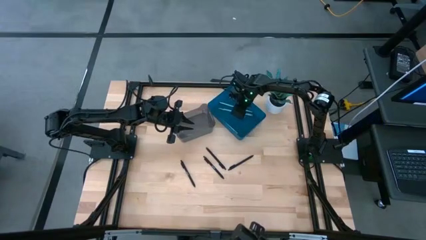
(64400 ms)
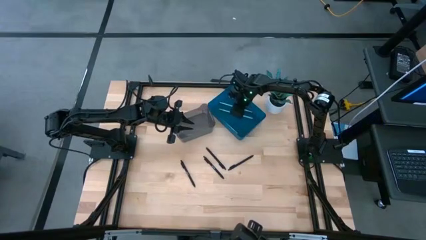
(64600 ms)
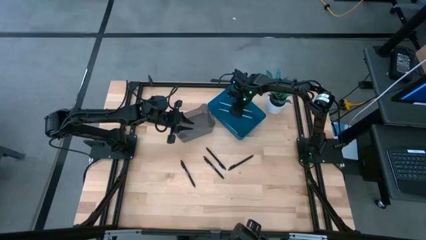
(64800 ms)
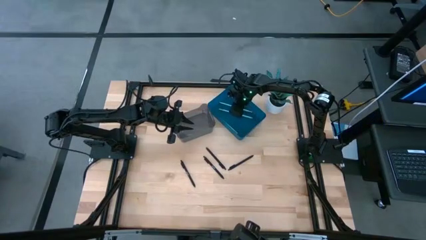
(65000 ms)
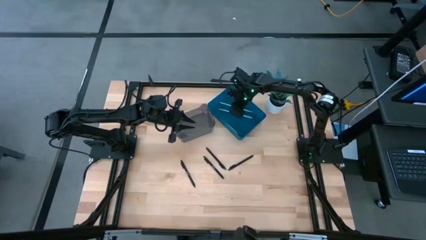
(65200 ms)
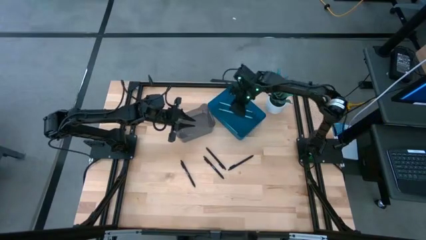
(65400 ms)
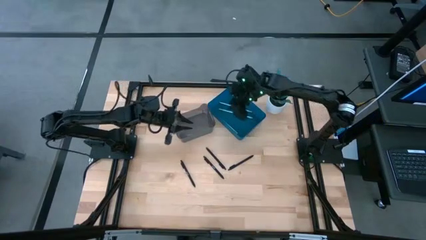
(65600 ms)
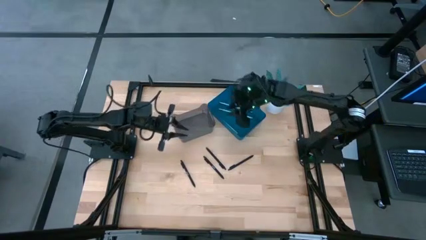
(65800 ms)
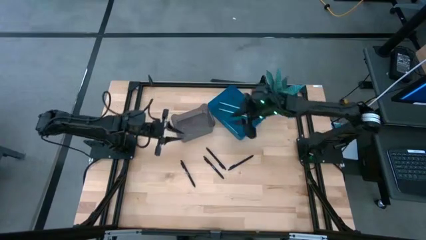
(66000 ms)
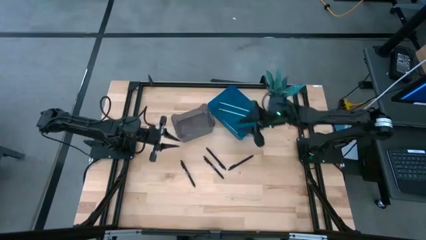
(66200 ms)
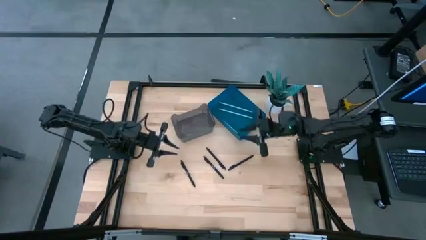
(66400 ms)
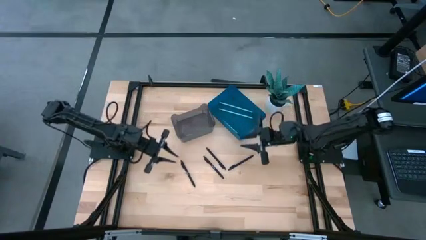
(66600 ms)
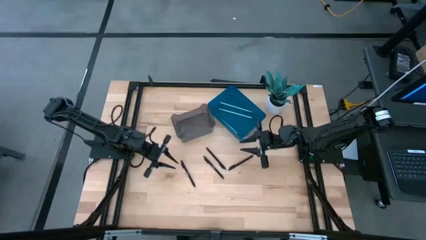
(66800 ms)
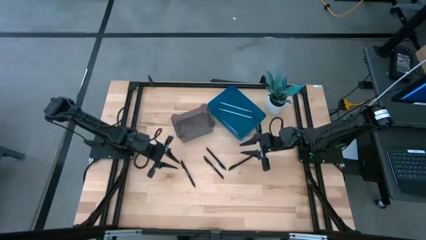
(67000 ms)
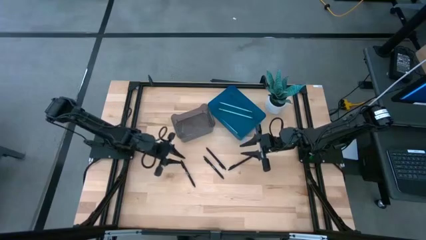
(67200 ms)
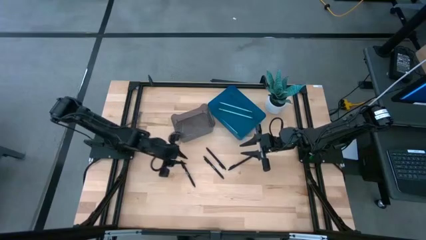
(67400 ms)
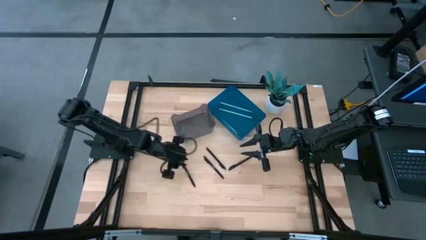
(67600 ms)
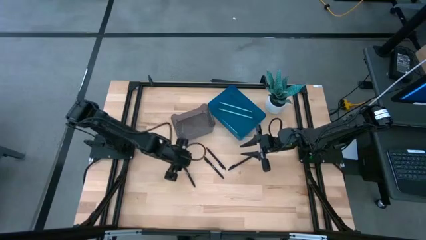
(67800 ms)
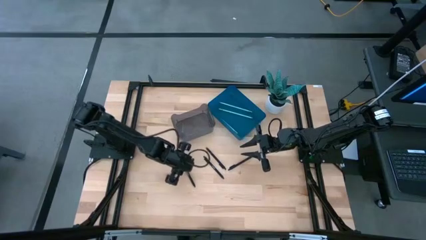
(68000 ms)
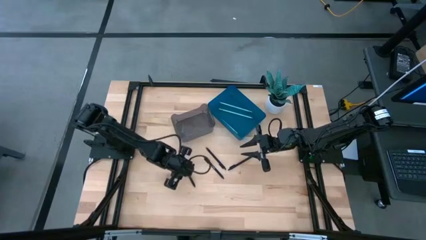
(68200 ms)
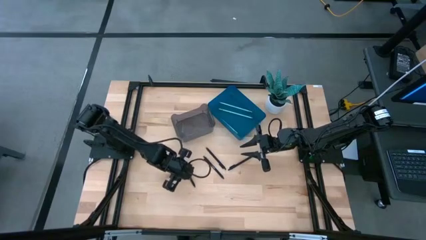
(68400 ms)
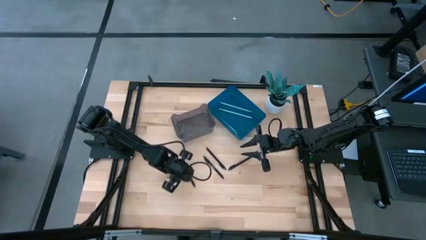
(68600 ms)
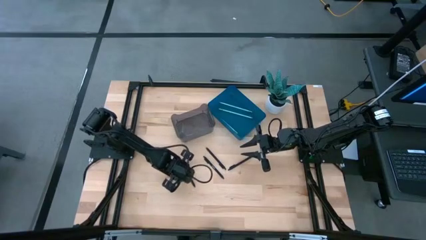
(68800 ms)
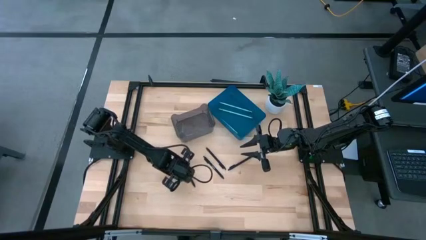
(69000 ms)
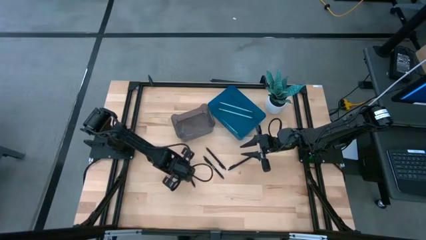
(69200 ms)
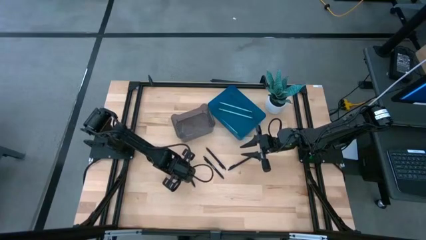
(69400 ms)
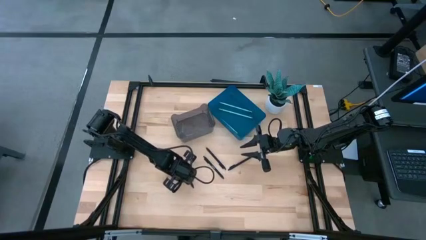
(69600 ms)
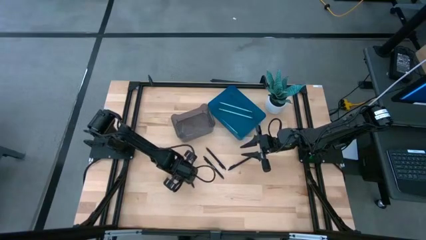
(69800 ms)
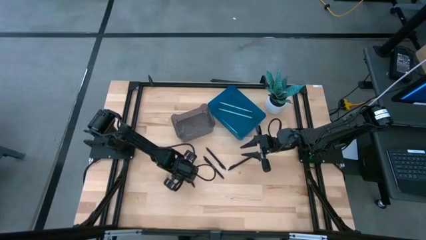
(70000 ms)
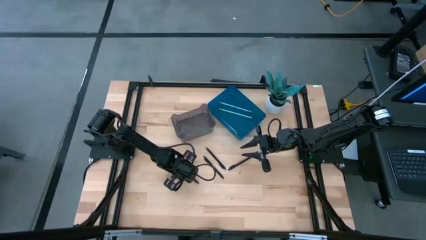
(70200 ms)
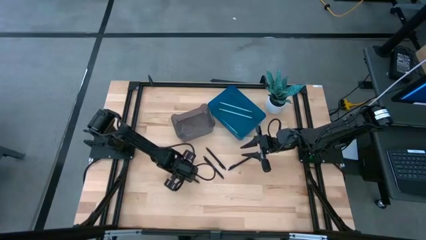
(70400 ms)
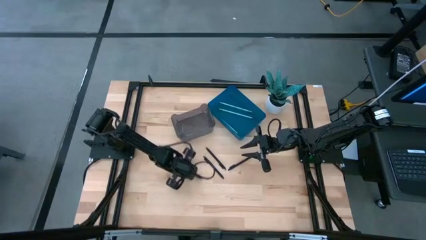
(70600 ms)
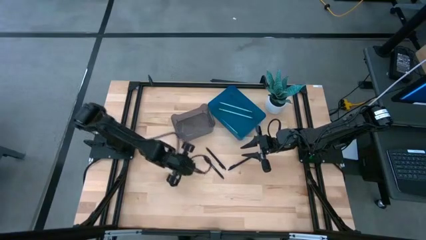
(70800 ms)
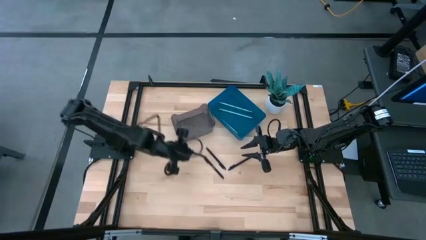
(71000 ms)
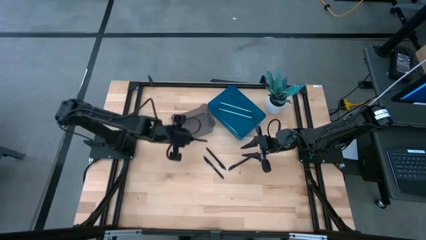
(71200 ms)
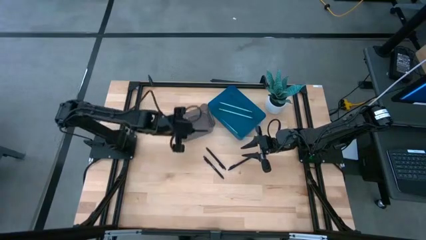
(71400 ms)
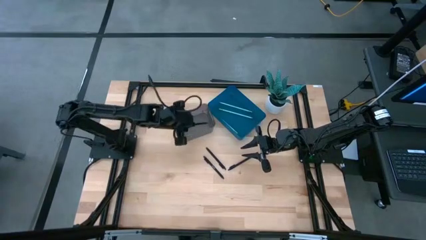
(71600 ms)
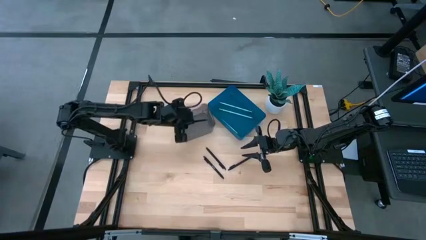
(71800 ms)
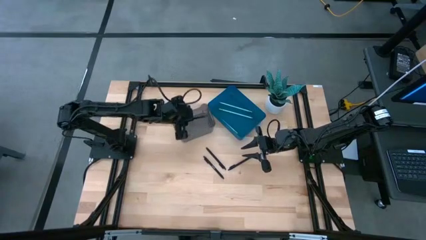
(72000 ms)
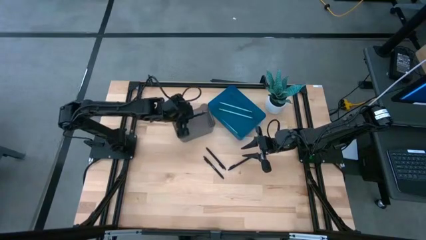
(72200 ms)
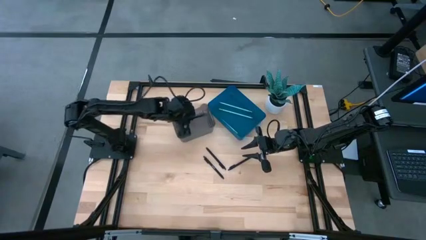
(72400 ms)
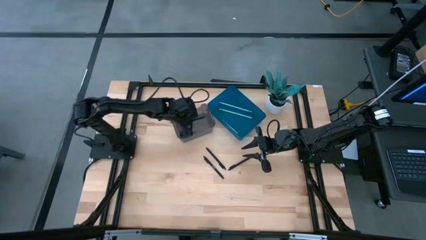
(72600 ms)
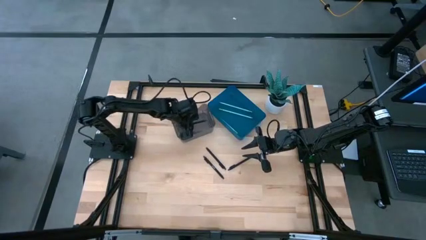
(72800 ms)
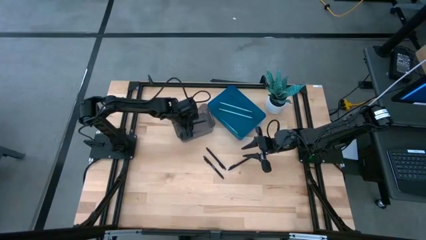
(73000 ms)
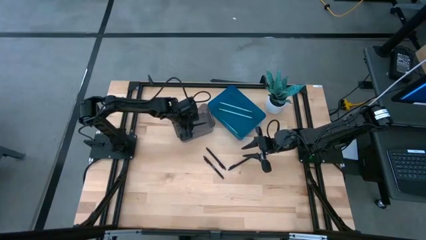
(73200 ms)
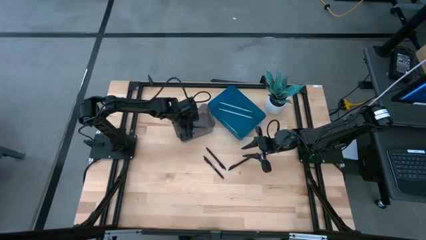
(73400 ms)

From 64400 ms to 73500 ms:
Task: Sort pens & pencils
Put the black pen into the black bin

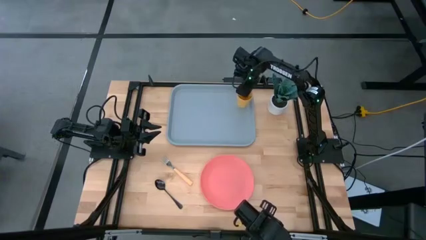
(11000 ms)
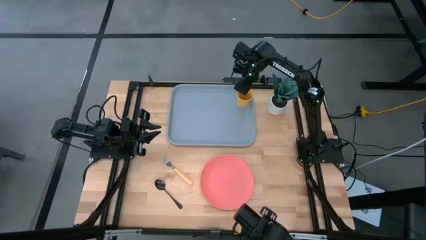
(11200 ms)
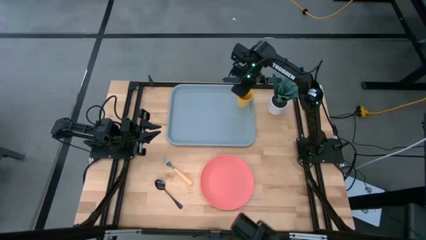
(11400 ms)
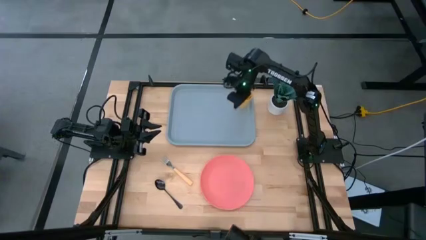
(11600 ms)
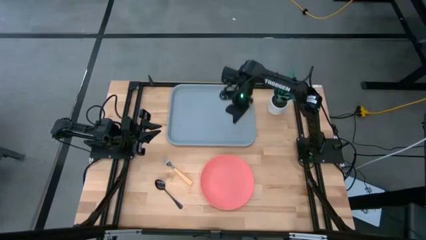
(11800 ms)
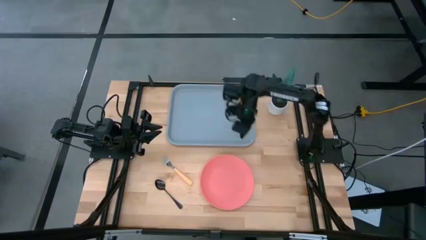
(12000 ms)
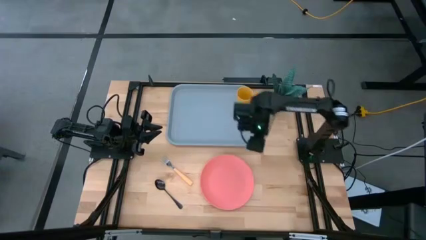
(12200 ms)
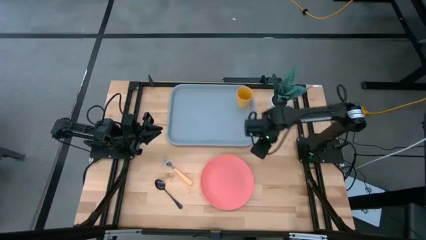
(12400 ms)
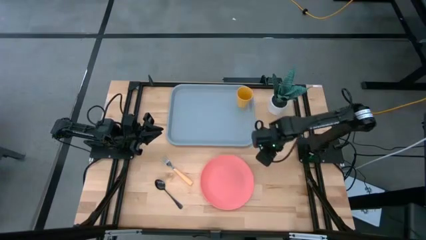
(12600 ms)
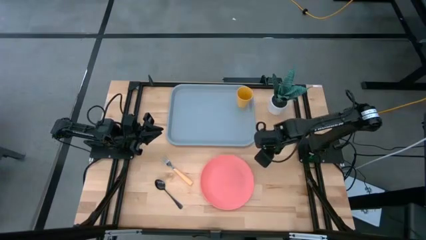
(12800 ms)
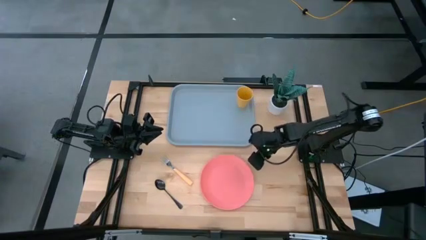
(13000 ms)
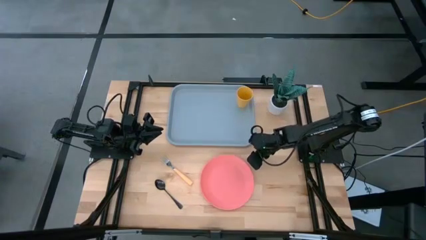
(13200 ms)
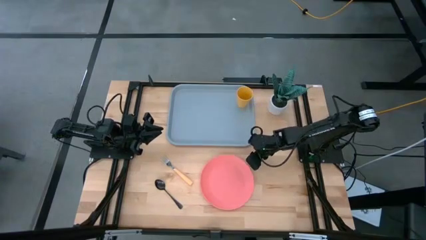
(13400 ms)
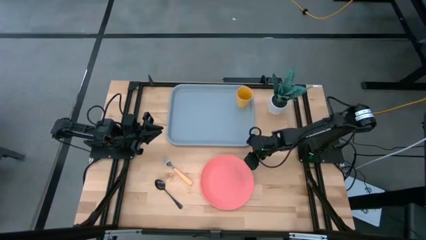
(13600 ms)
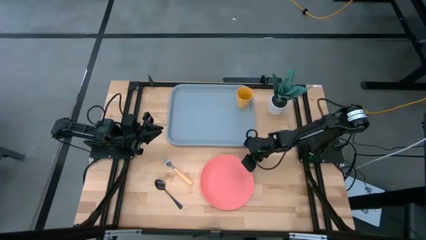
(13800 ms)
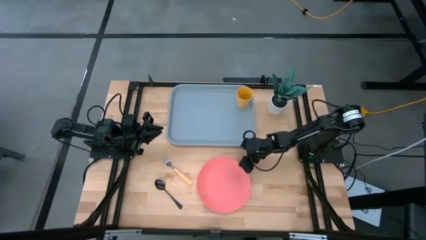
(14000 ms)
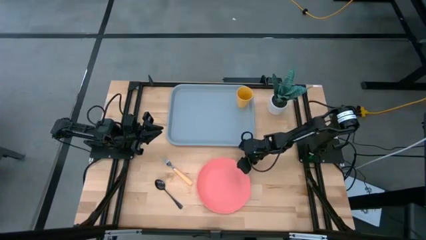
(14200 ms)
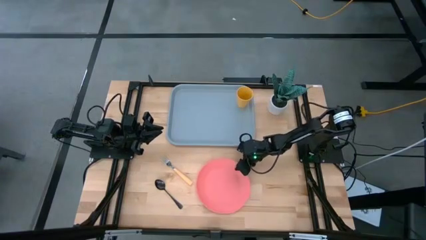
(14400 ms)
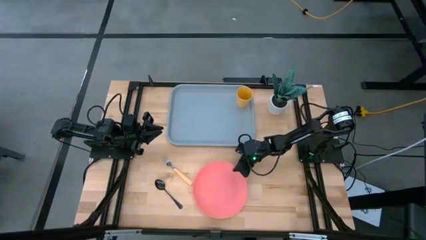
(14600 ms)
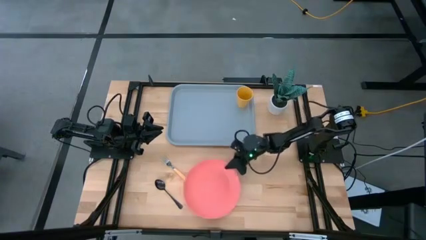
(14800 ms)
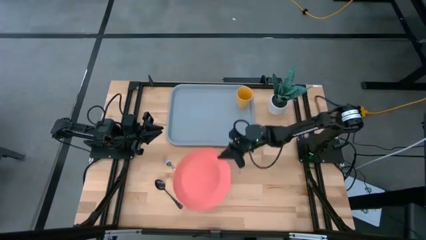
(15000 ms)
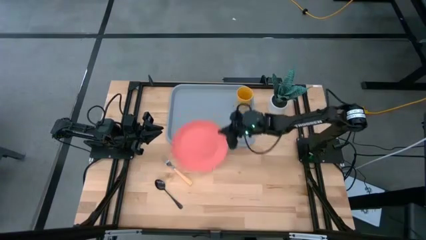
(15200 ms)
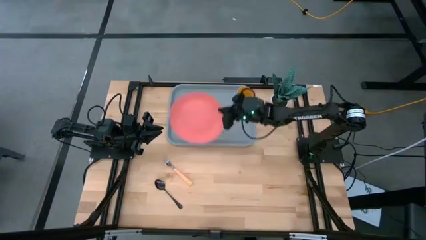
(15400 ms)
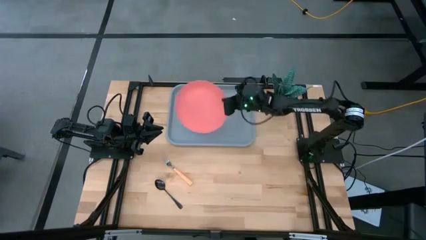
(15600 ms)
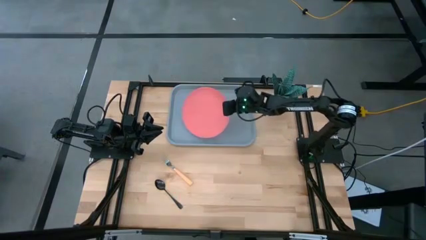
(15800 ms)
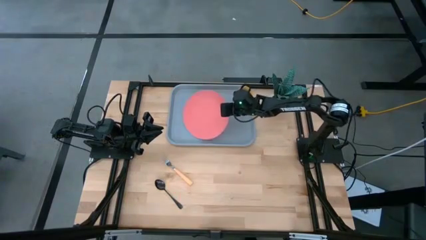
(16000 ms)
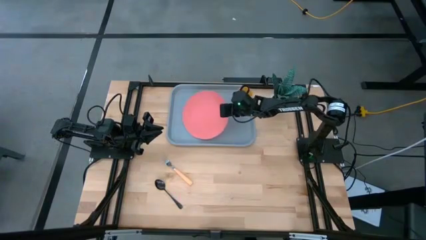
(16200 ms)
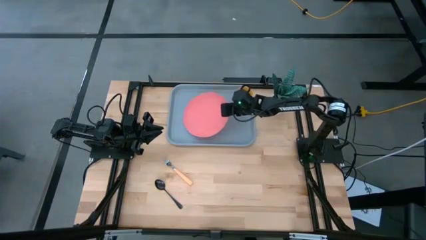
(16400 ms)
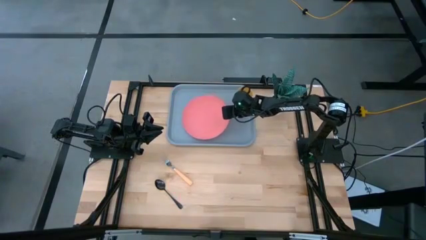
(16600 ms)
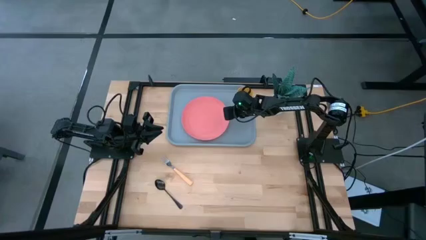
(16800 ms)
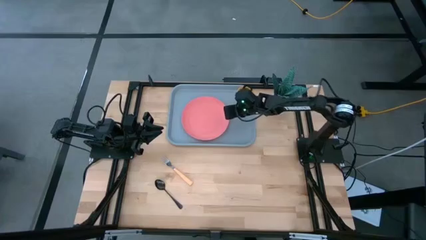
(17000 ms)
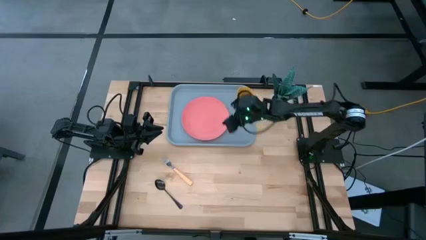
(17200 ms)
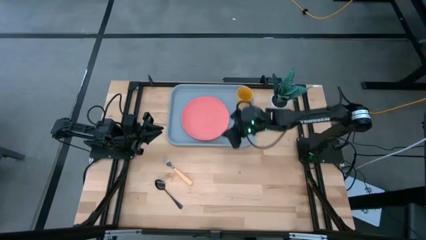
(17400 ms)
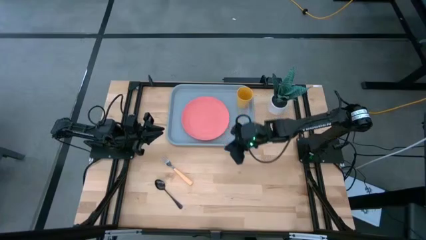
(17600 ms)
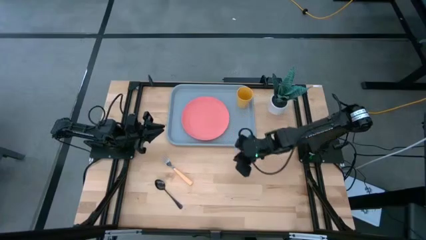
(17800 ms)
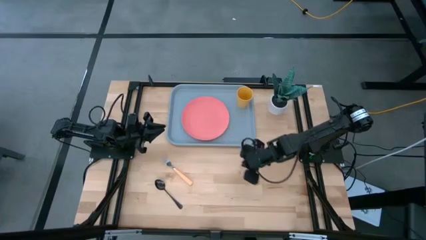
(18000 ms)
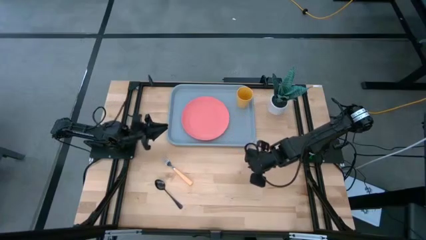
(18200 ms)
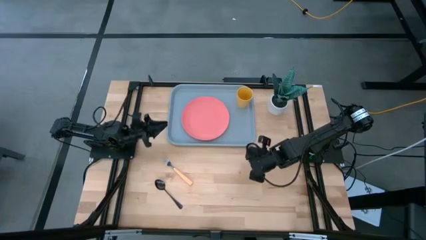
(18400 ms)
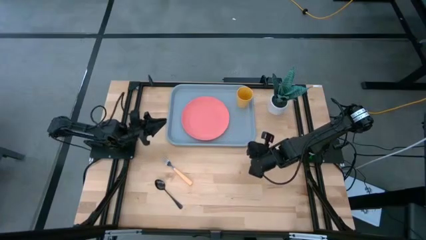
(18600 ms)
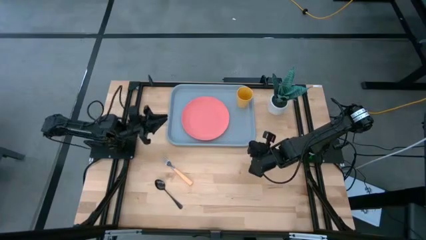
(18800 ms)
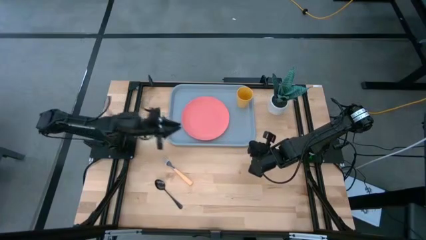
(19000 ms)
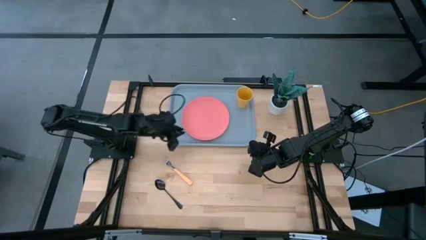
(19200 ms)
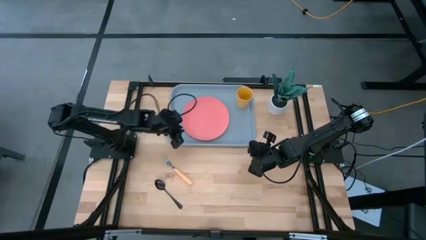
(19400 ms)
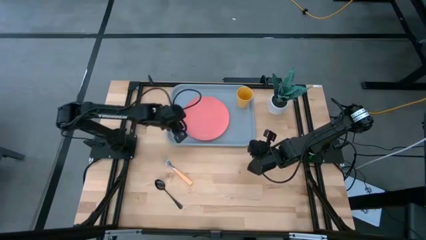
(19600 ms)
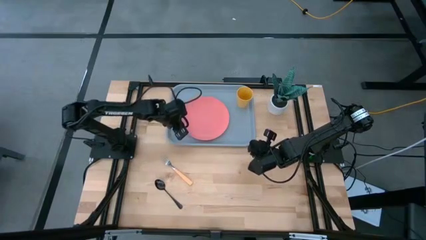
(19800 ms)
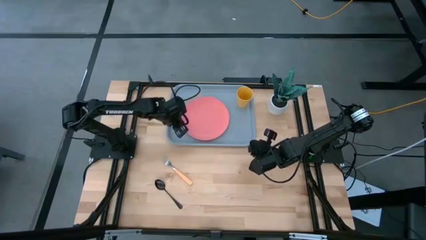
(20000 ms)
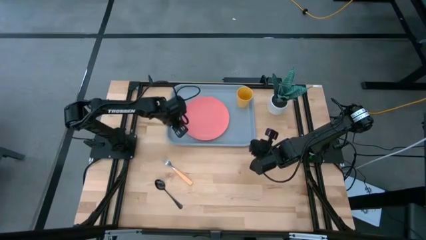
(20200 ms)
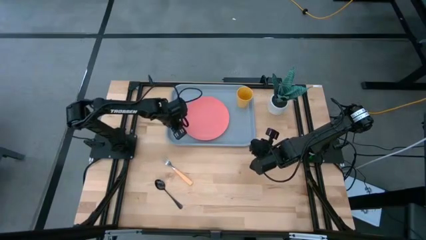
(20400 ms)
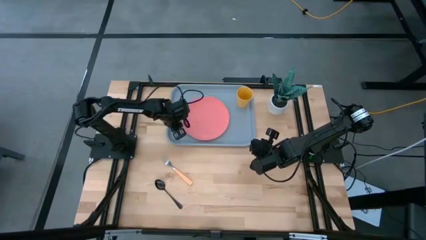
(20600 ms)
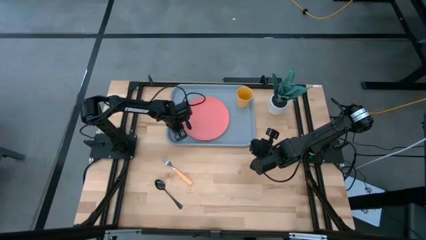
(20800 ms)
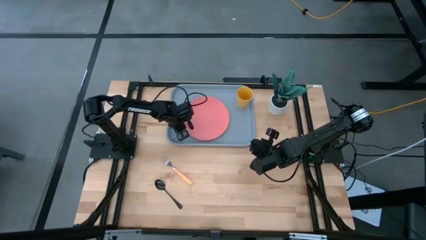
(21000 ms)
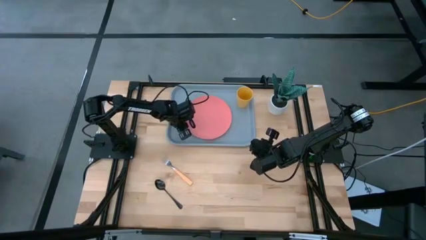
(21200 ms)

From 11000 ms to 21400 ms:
Task: Pick and place plate/cup/fork/spoon on tray
Put the pink plate on the blue tray
